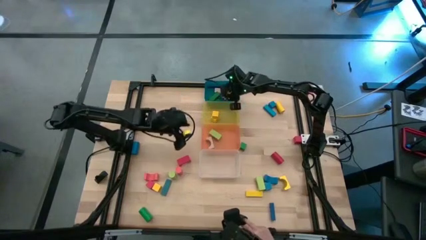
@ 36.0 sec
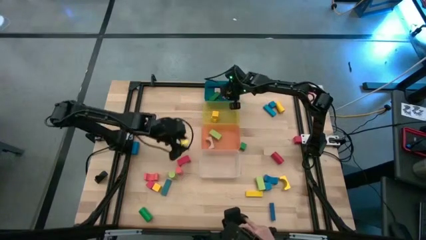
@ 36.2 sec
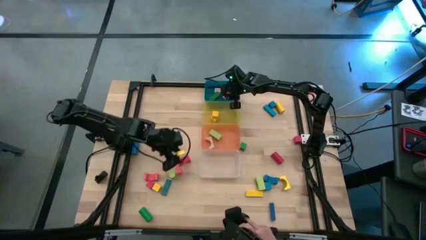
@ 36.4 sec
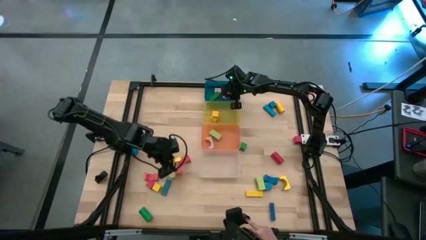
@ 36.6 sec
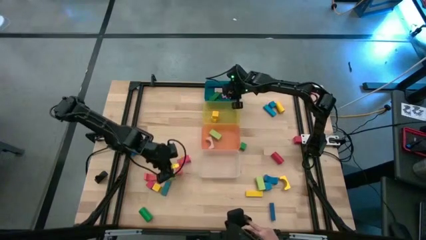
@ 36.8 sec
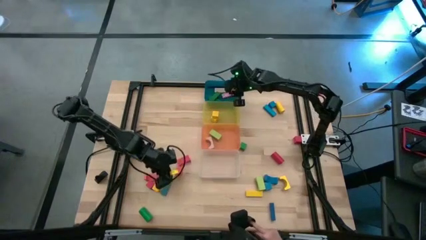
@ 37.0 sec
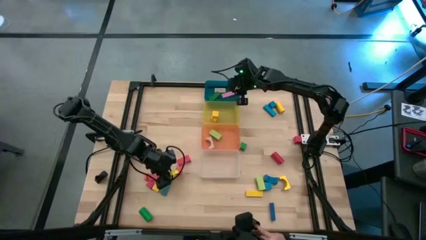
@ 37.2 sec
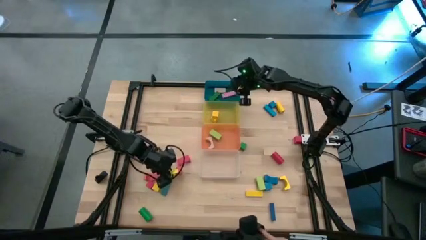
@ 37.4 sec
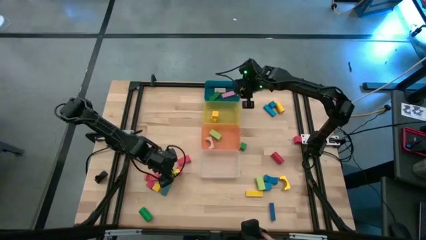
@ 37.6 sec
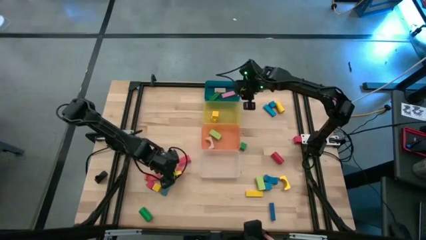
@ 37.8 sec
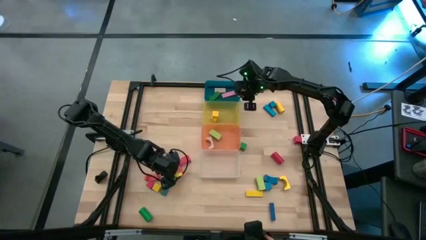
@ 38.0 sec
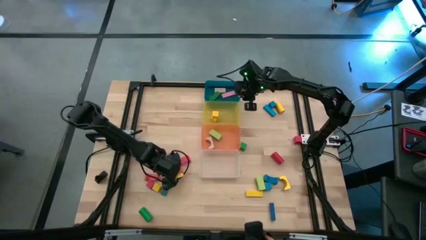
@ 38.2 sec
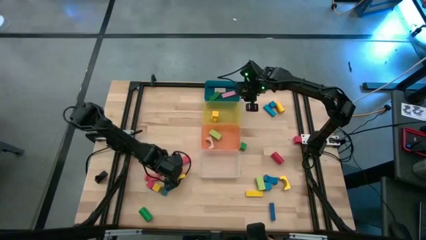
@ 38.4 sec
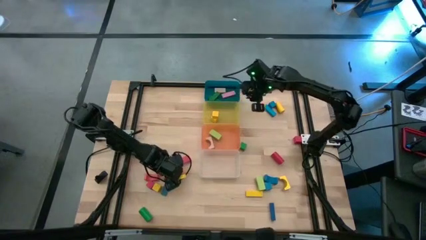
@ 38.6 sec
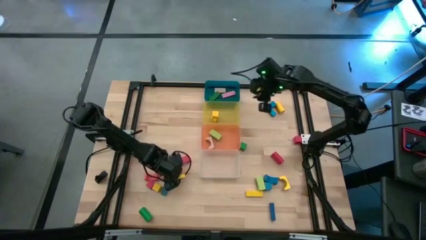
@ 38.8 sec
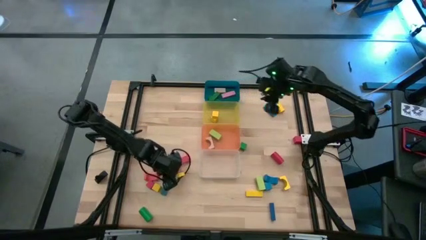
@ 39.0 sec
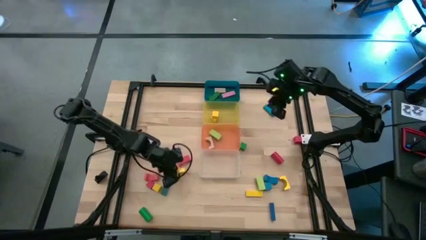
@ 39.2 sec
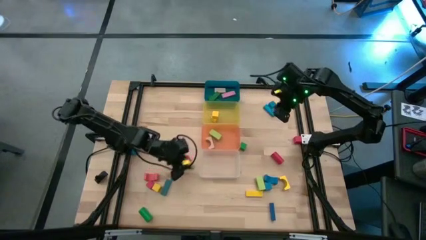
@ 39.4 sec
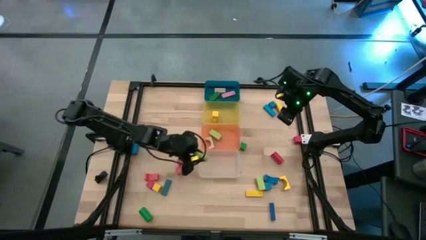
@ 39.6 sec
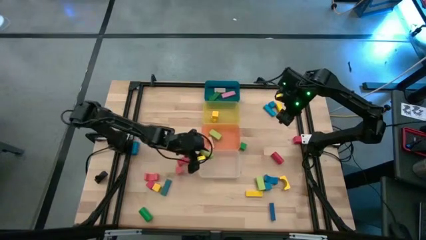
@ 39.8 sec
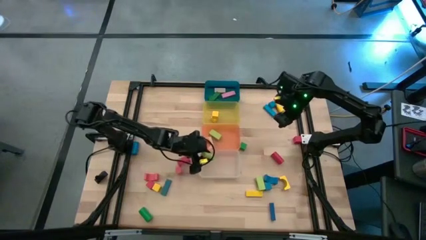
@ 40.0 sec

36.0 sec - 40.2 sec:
Task: Sort blocks by size
Put the light green cylindrical block into the transparent bin

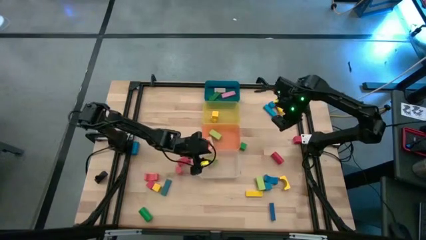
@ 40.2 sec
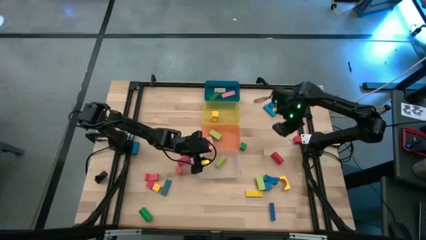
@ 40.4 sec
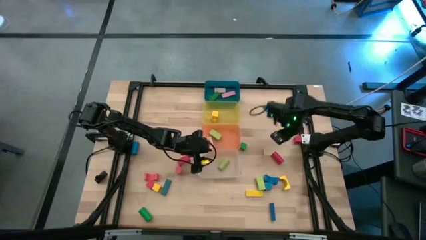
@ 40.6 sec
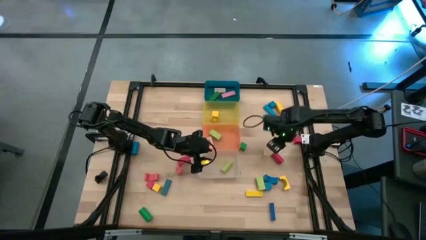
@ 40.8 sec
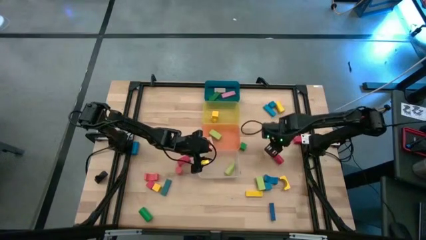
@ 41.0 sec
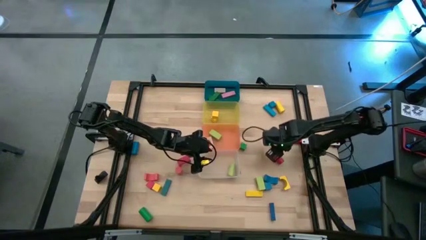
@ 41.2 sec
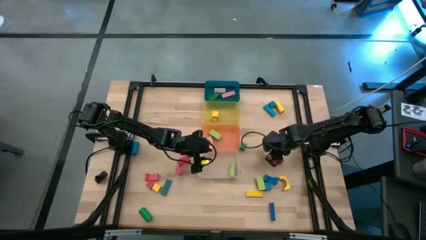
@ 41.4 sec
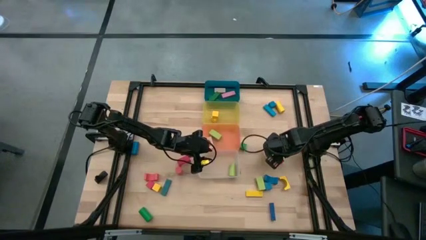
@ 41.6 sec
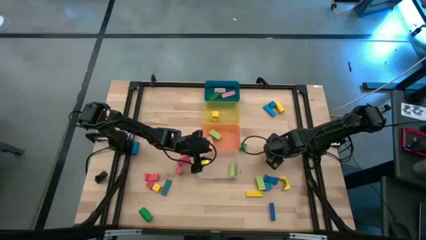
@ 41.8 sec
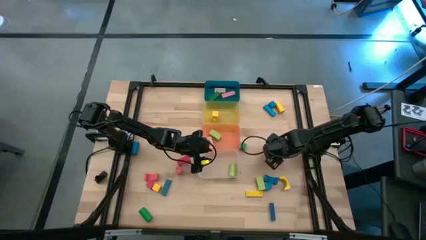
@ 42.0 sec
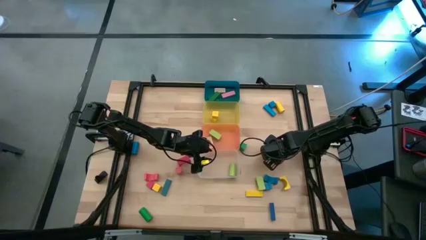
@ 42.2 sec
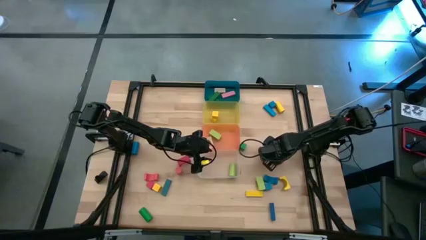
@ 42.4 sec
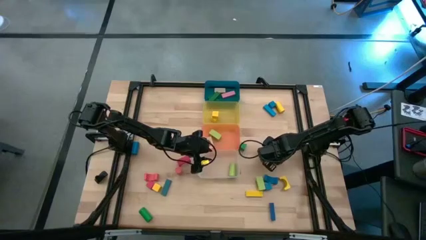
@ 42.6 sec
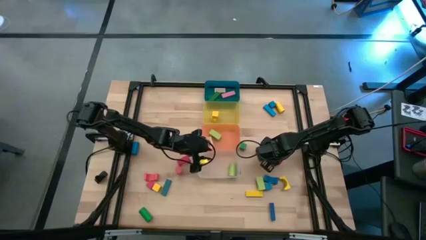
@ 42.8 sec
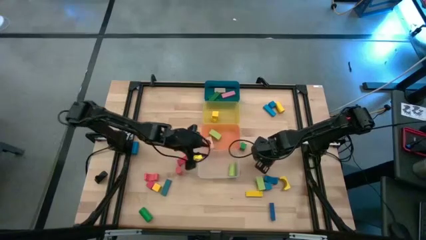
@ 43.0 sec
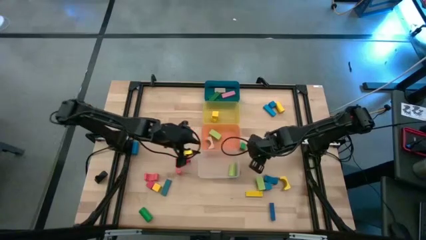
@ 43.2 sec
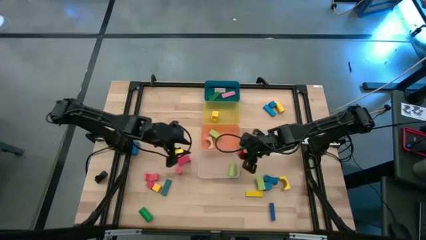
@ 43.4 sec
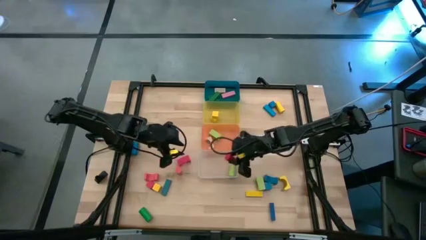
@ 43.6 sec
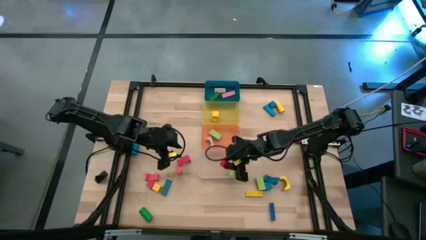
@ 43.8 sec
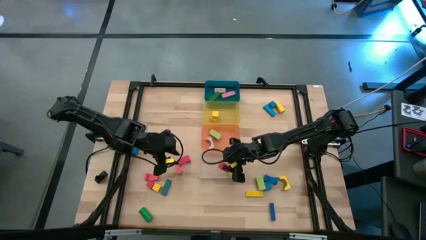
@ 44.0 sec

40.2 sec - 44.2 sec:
Put the red cylindrical block into the transparent bin

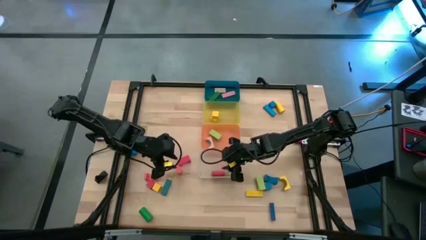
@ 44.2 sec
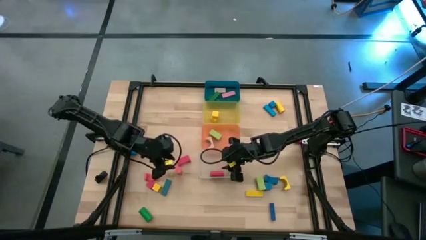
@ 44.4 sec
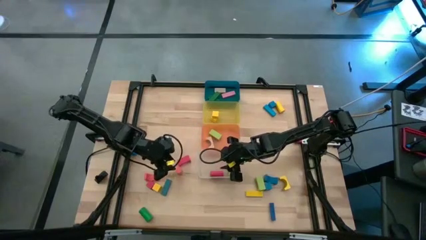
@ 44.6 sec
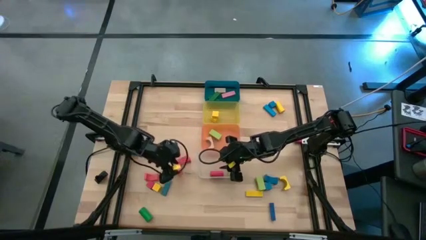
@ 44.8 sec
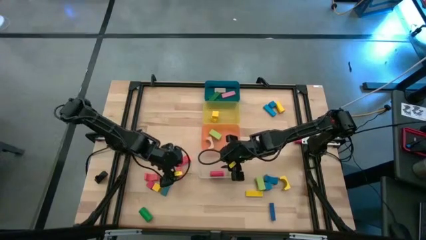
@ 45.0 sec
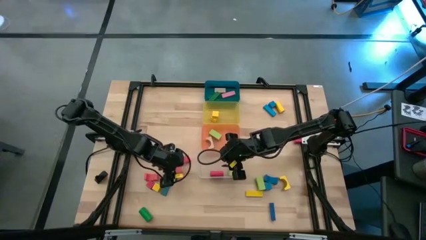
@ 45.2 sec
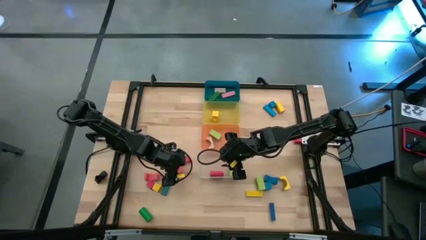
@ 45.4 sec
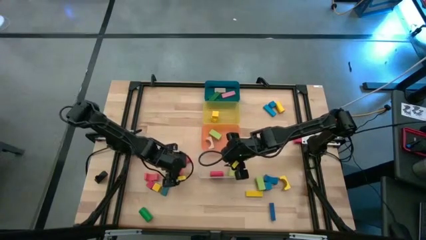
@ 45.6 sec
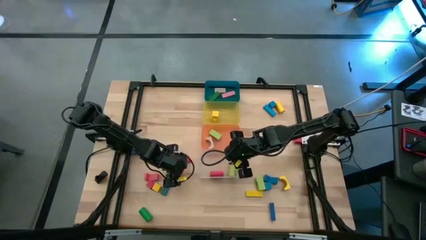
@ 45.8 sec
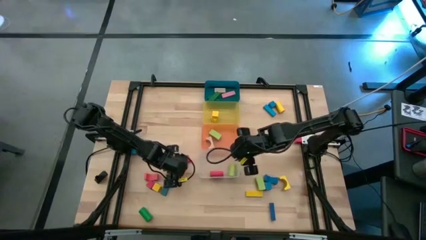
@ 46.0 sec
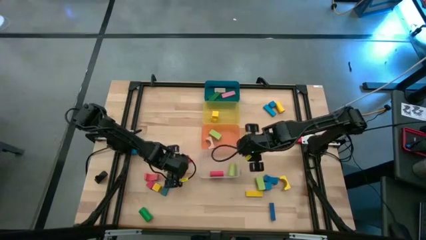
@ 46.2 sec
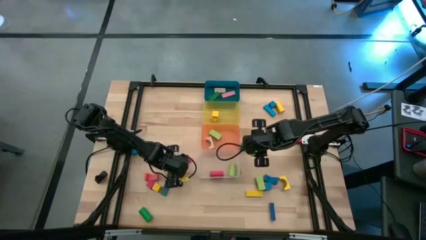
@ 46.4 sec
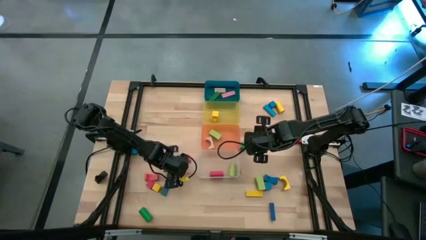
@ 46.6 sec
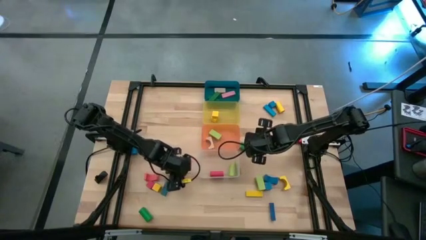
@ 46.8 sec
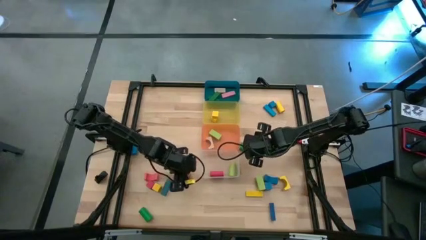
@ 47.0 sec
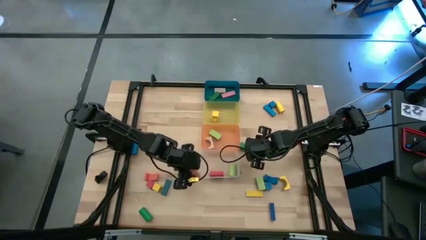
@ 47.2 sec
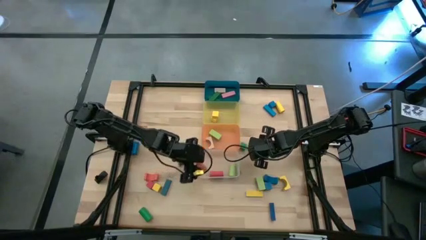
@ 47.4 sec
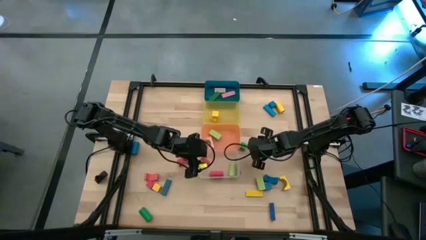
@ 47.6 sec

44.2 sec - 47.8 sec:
Put the orange cylindrical block into the transparent bin

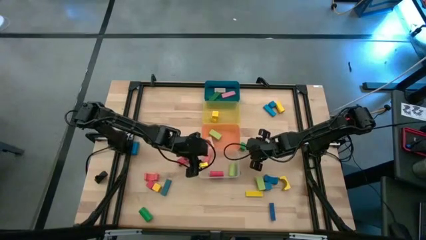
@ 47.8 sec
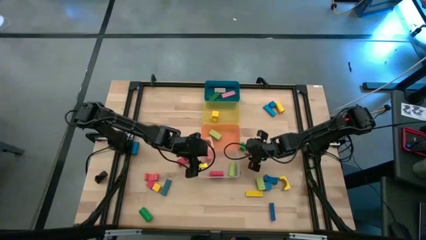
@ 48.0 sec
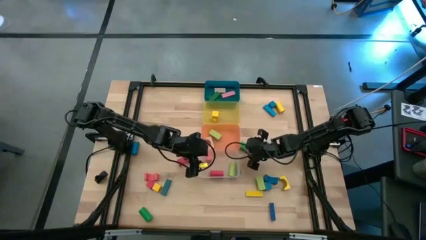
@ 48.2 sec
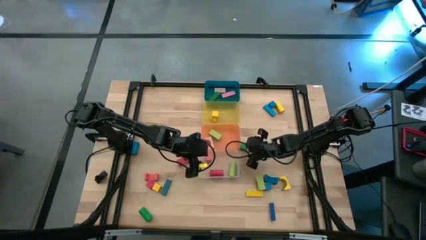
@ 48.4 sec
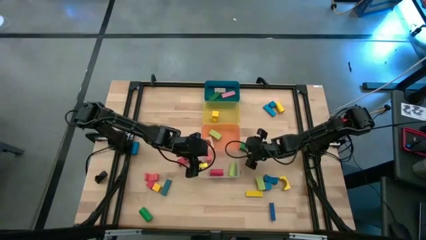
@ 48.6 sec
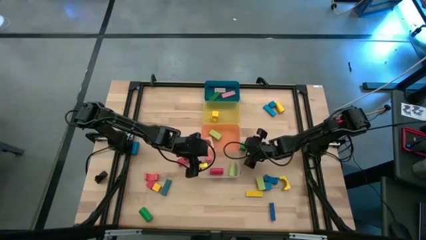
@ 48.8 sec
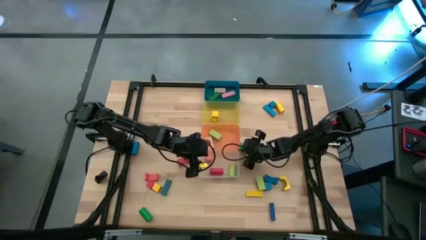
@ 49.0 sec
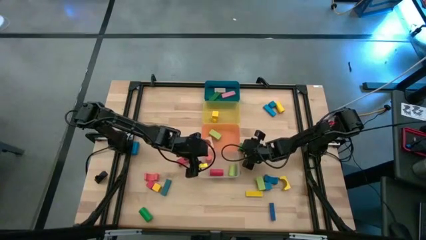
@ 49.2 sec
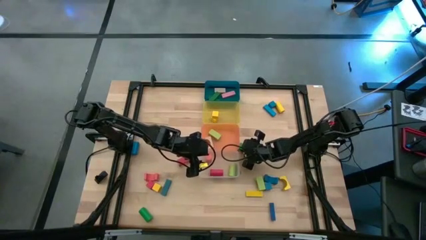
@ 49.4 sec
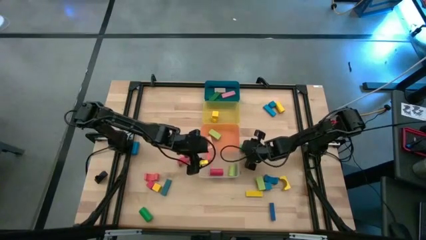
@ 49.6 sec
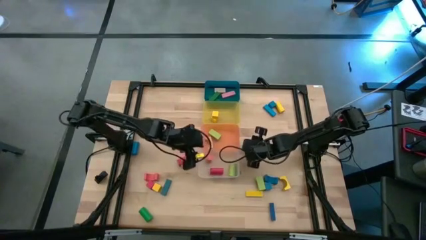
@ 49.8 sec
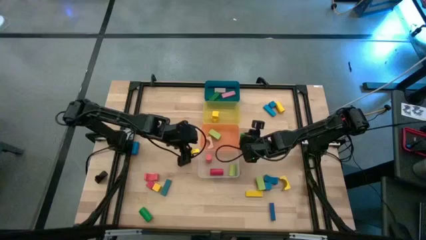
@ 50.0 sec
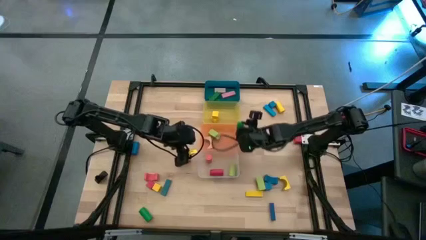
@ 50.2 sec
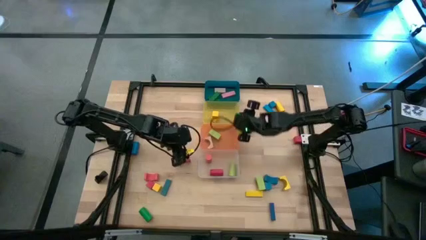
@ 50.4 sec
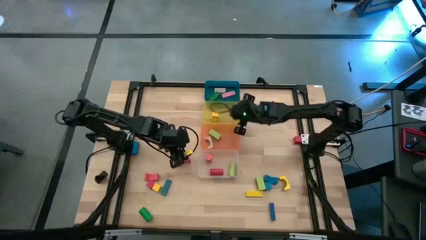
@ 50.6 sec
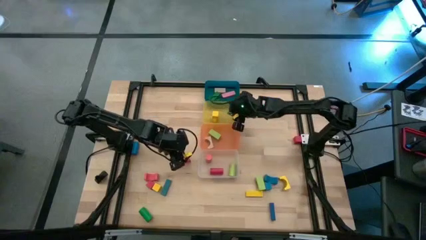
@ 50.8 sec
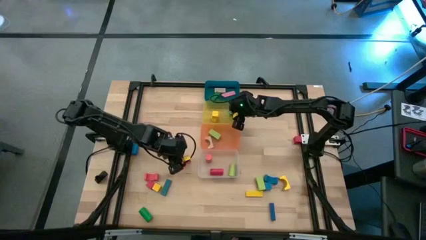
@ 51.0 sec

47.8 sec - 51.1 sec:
Put the green square block into the yellow bin

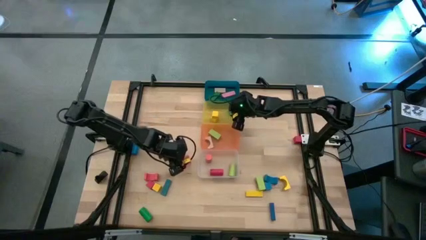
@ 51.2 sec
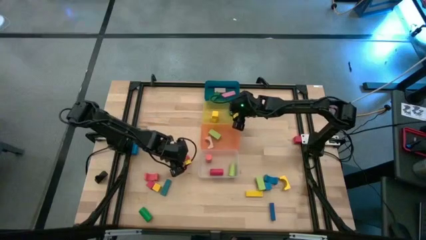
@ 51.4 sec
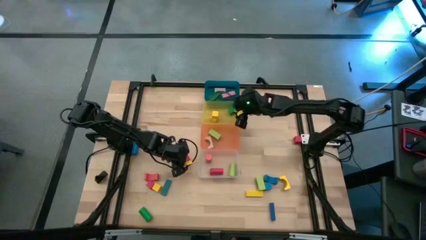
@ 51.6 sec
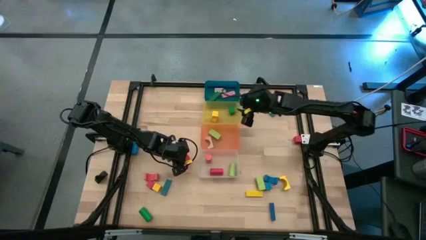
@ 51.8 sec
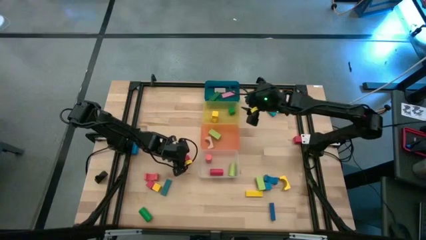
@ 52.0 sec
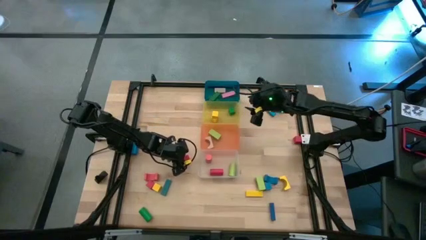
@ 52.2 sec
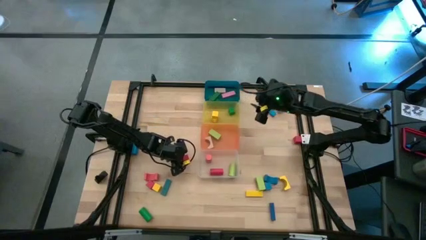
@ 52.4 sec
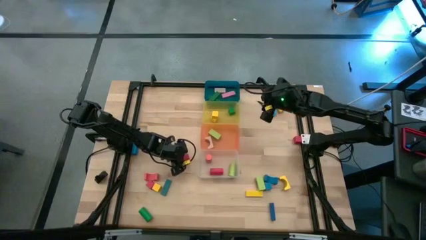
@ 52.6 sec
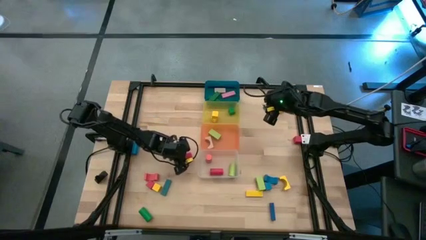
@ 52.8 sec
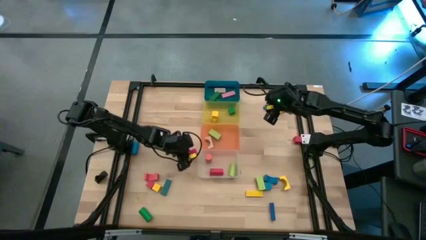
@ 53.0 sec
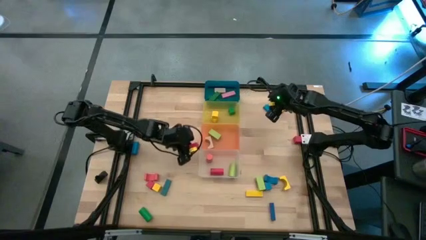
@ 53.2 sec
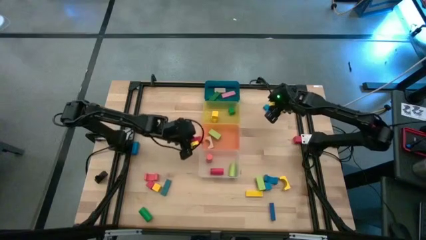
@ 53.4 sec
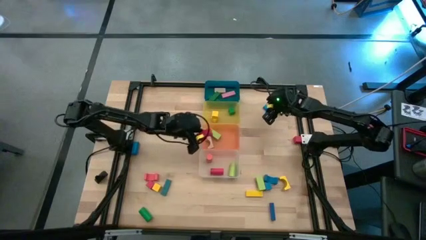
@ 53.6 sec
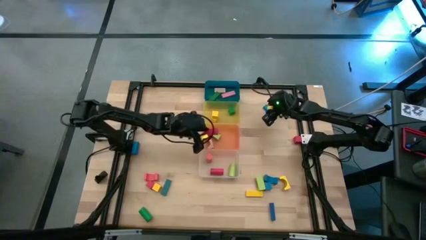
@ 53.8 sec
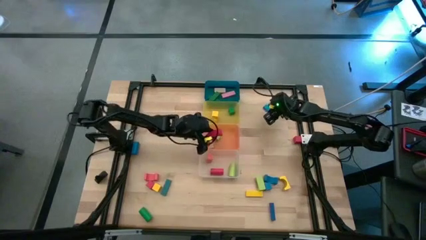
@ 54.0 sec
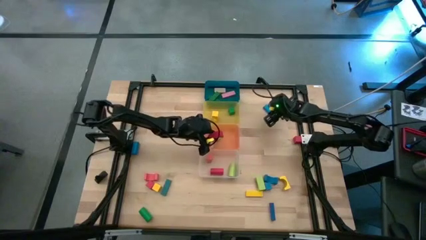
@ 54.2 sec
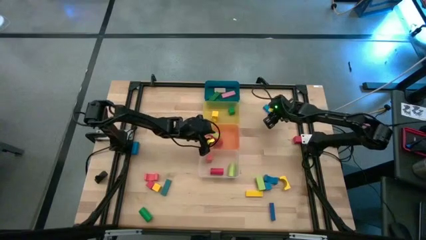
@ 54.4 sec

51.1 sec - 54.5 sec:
Put the red arch block into the orange bin
